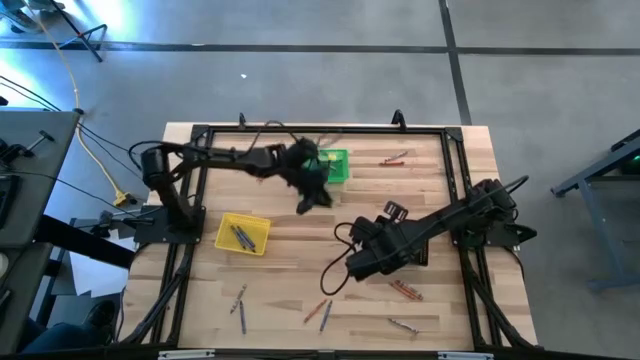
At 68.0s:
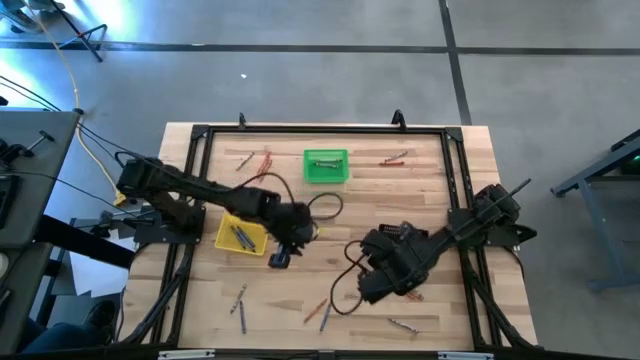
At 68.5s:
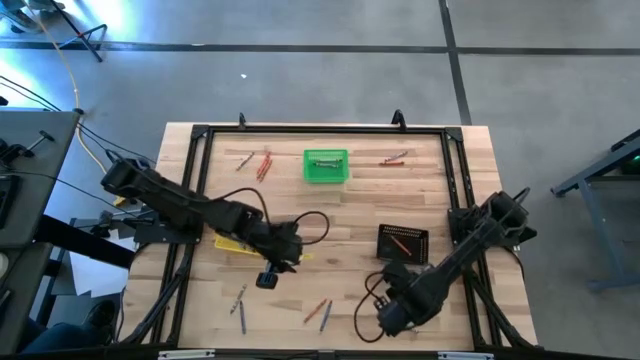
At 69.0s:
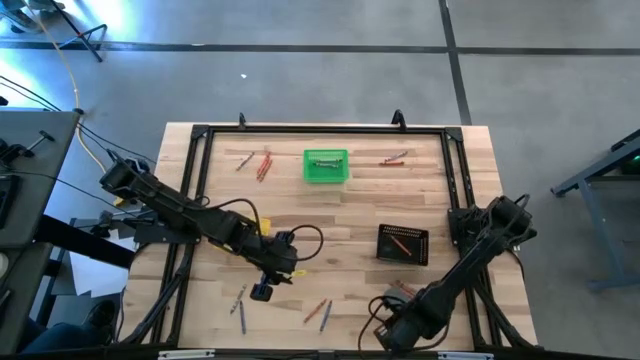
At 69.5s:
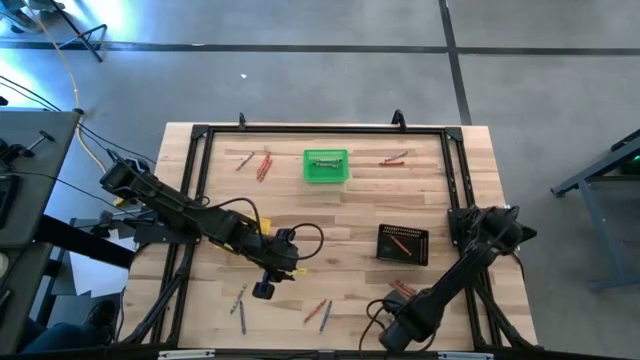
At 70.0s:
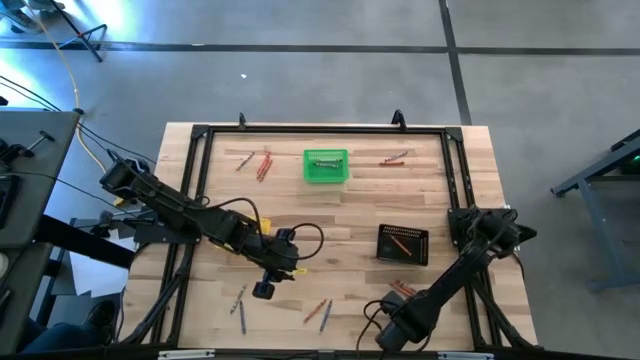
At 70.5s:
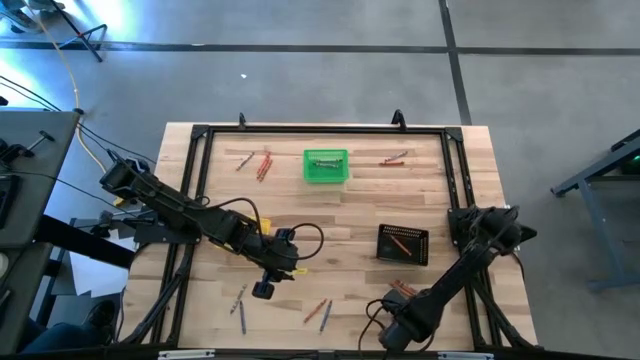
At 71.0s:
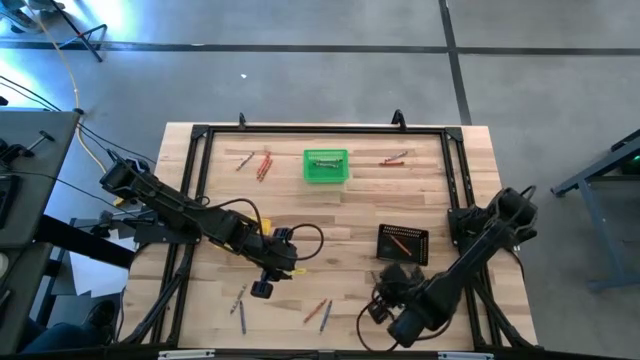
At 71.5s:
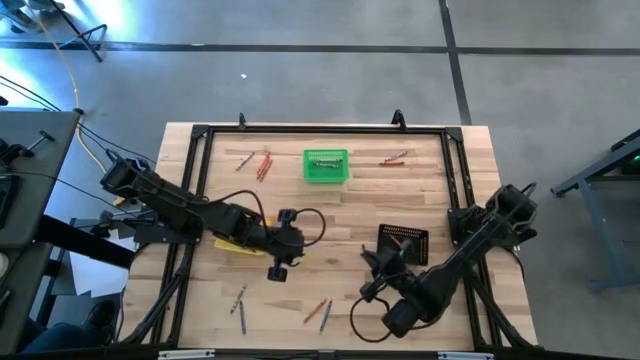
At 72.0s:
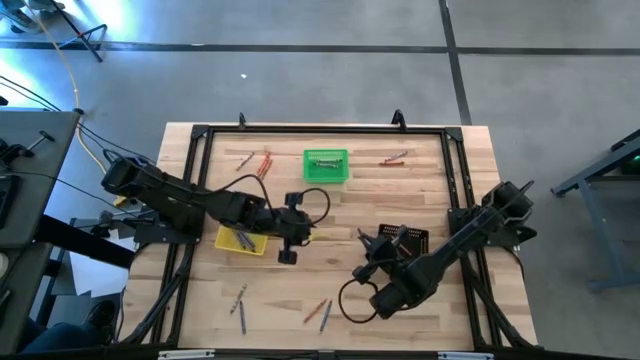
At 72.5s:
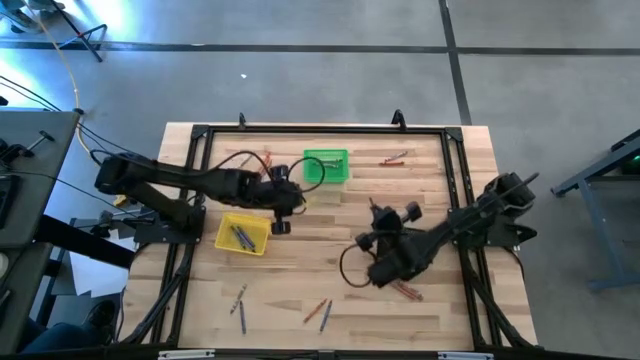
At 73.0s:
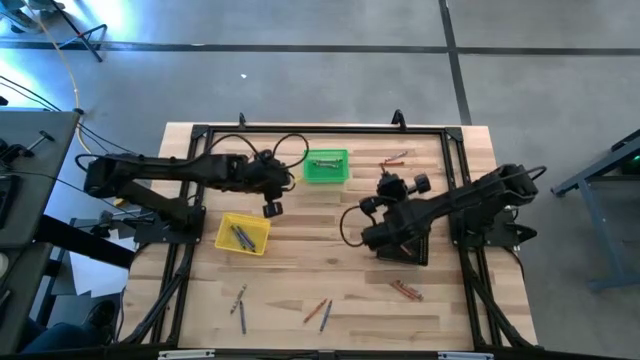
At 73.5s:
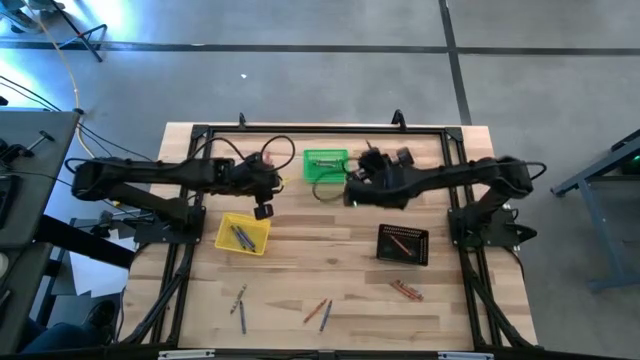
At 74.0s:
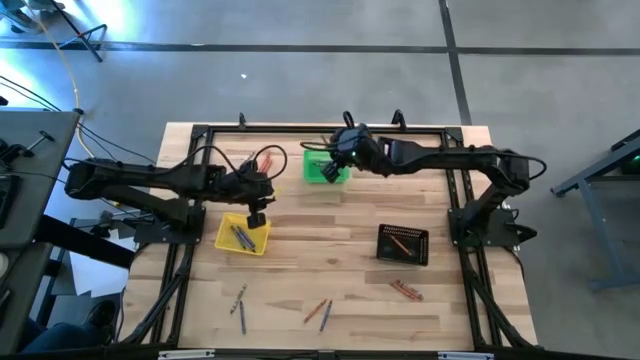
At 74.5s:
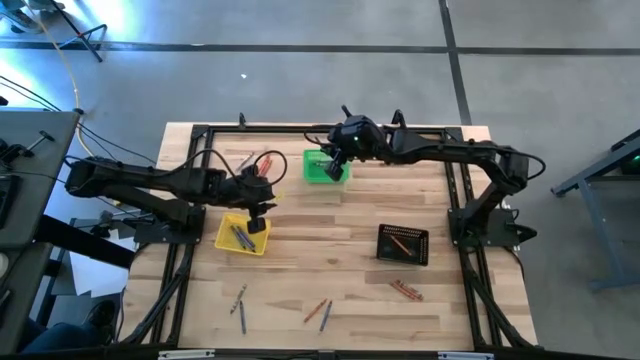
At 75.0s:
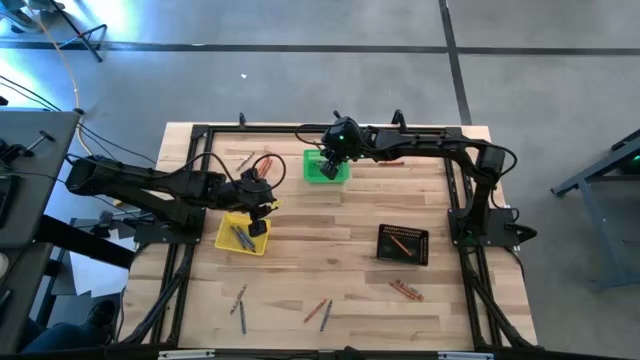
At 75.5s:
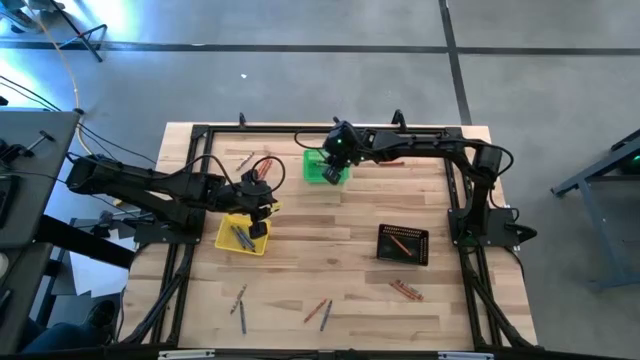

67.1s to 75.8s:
Task: Sort crayons
Put the gray crayon into the green basket

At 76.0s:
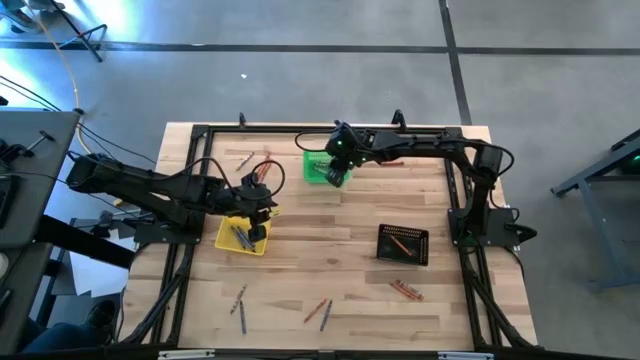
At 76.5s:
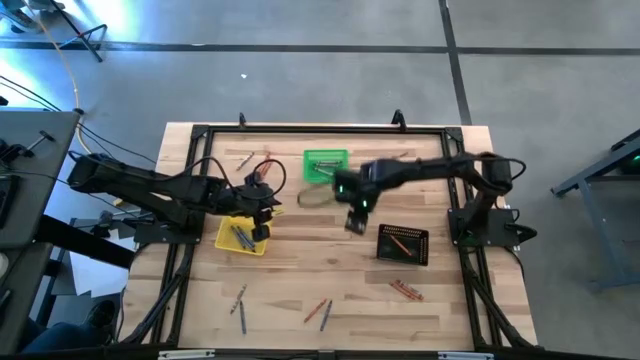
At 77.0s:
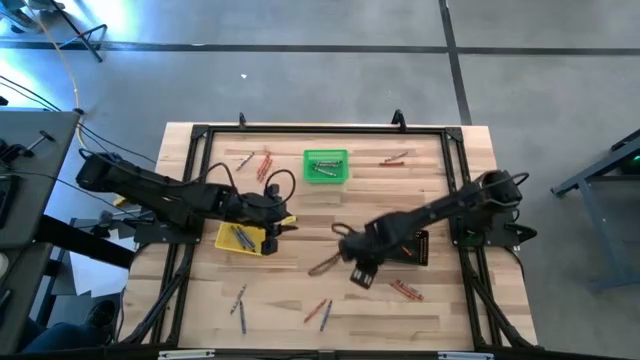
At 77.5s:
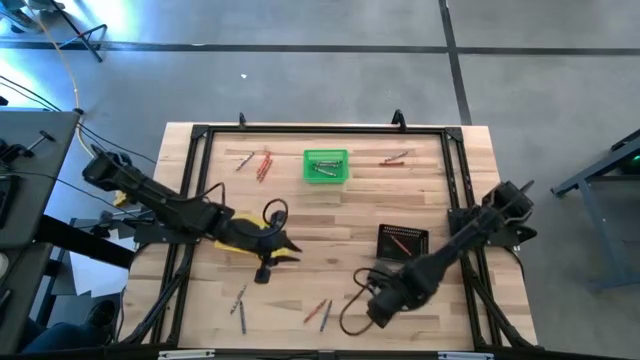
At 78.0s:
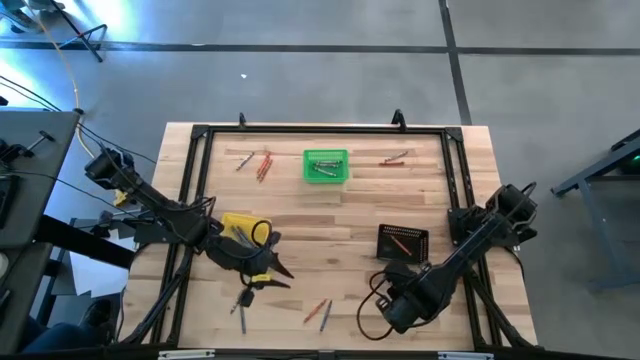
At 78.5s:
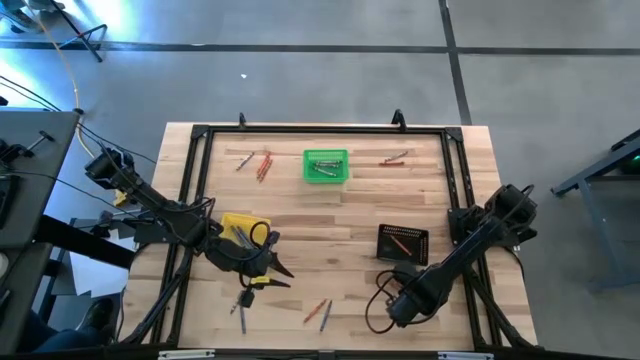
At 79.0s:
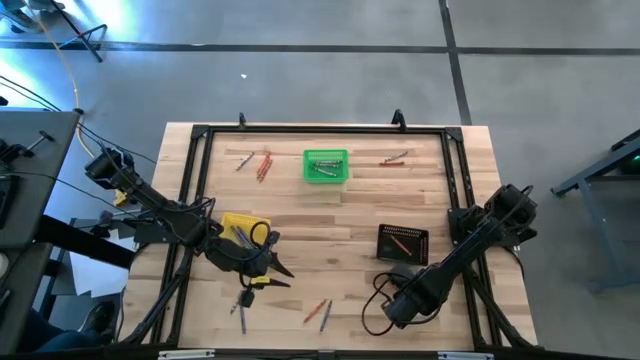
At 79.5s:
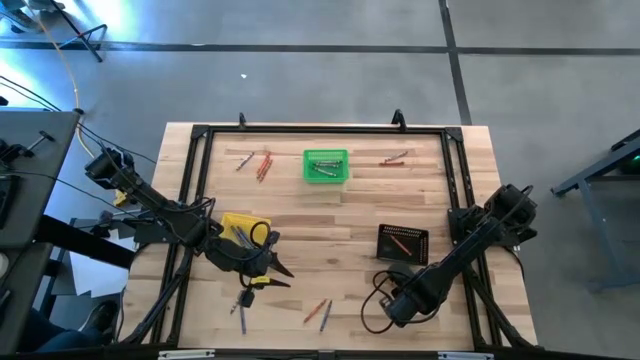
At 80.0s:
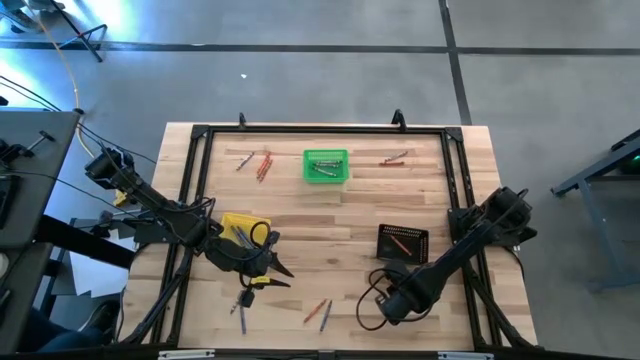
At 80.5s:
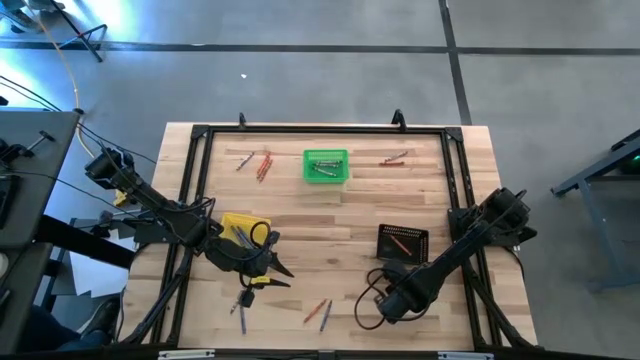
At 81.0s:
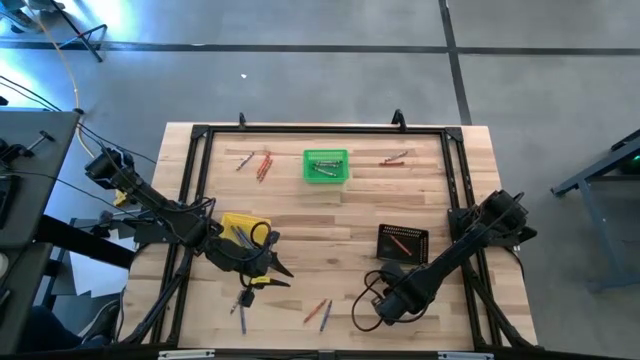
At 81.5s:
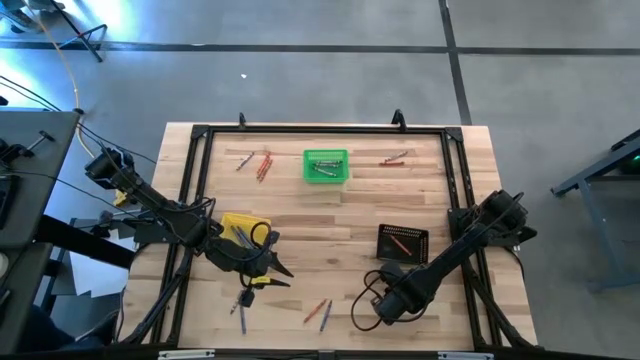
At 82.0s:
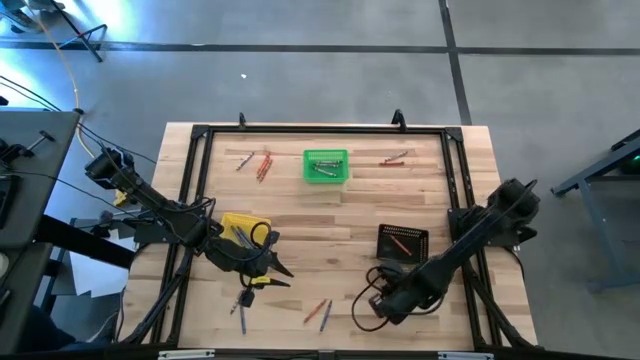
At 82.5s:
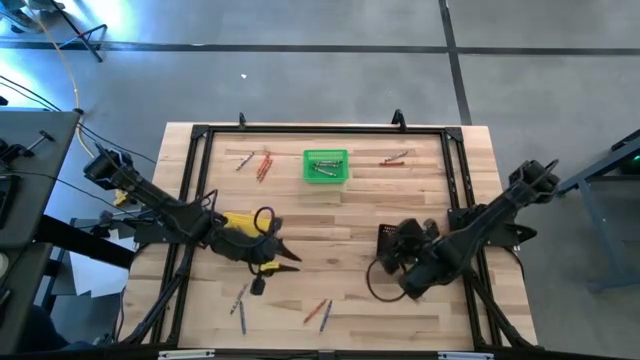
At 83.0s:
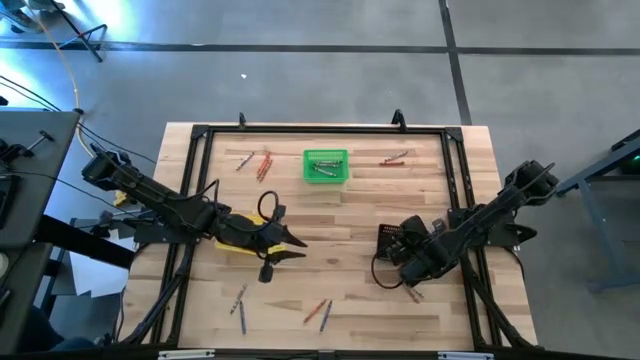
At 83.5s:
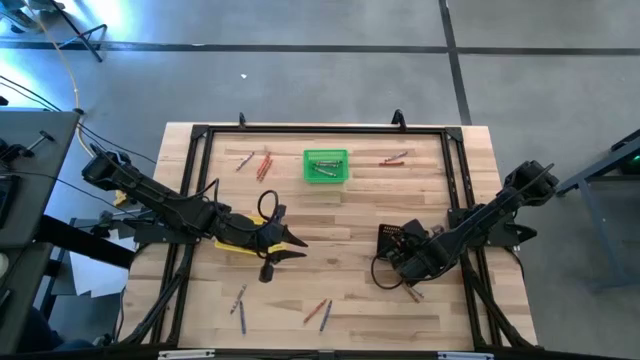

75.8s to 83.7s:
Put the orange crayon into the black basket

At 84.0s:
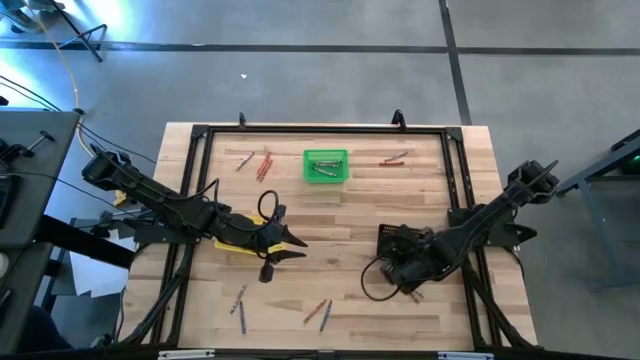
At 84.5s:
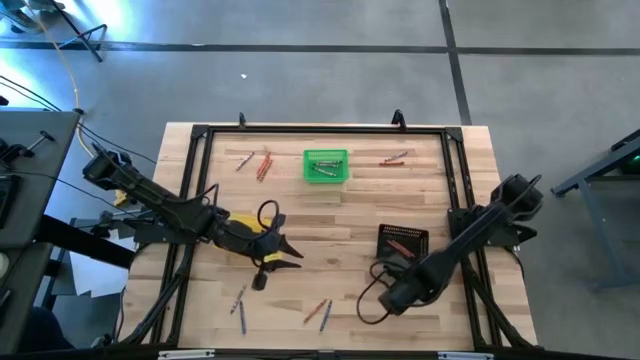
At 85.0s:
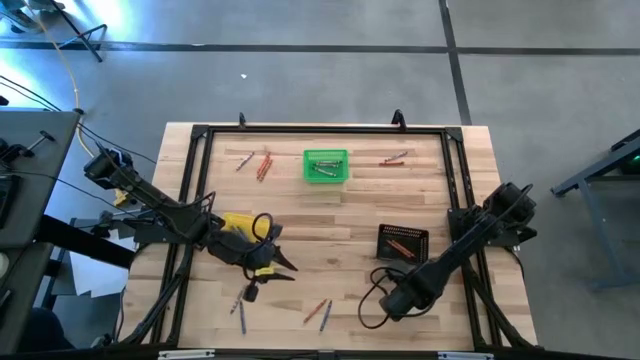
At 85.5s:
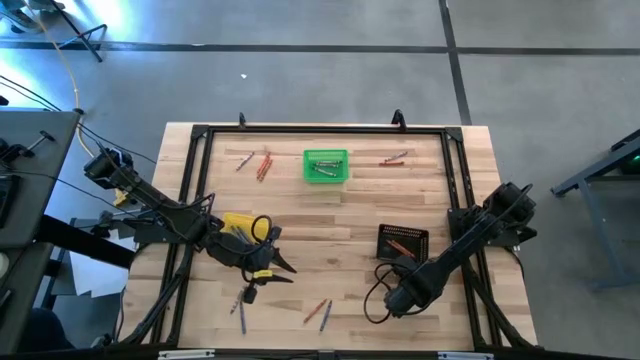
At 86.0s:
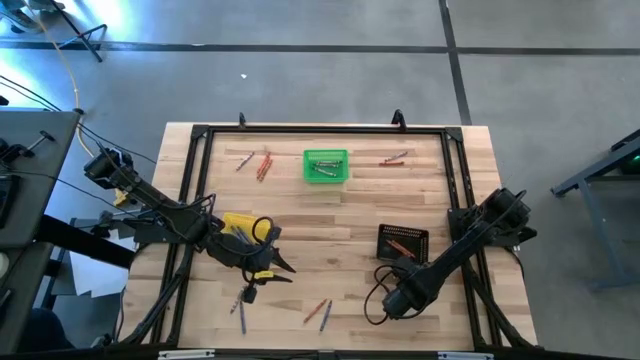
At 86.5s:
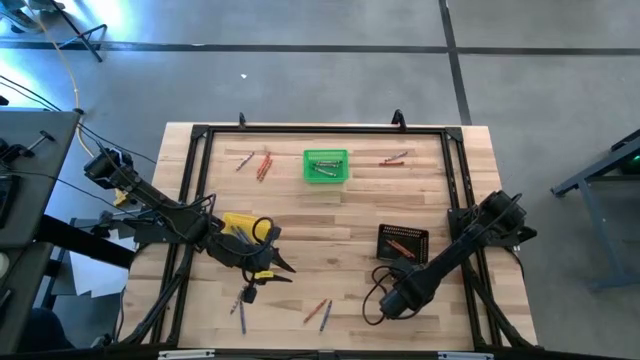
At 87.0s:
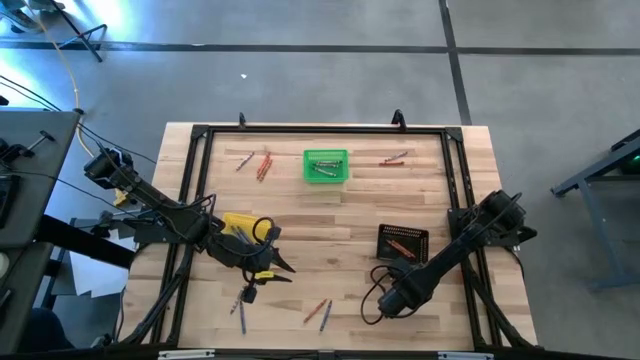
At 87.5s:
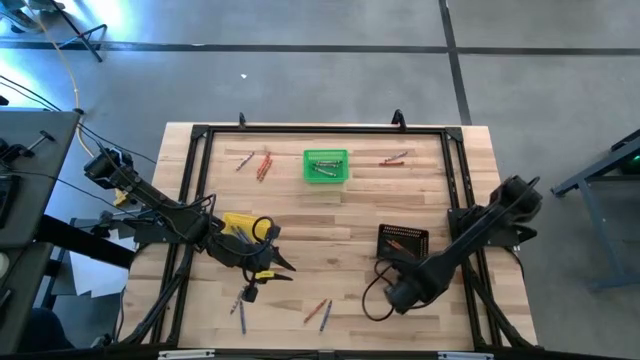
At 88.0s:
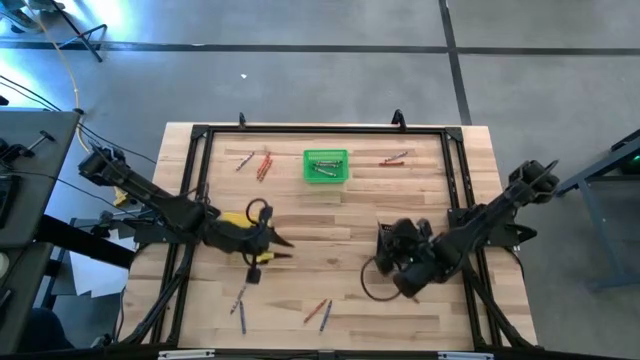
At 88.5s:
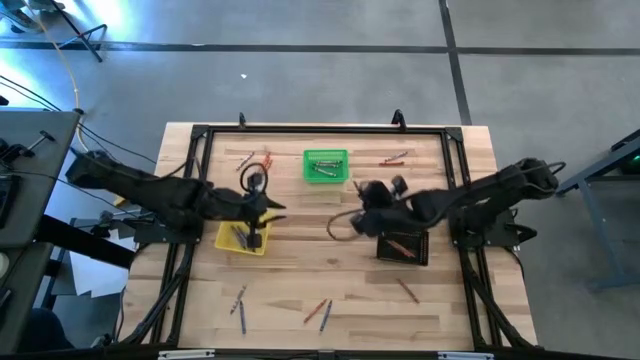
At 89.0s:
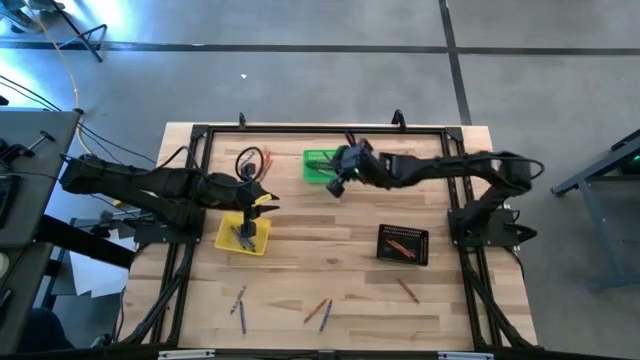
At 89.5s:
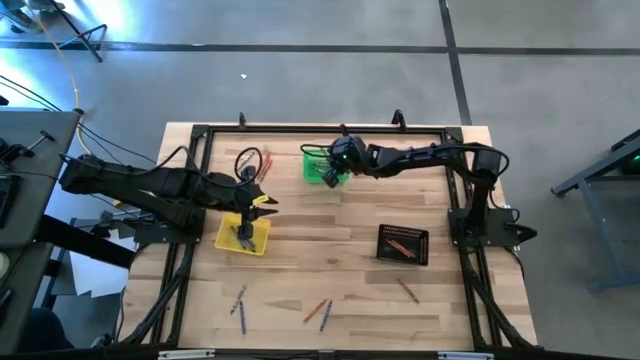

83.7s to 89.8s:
Put the gray crayon into the green basket

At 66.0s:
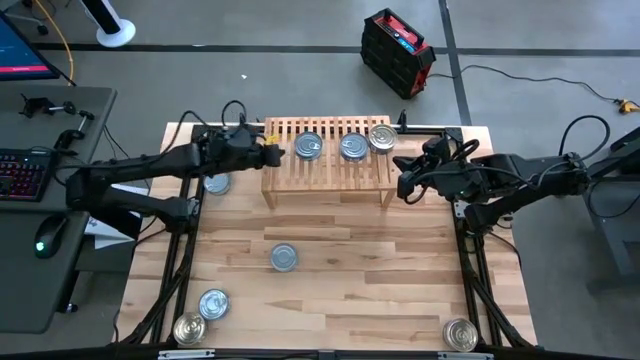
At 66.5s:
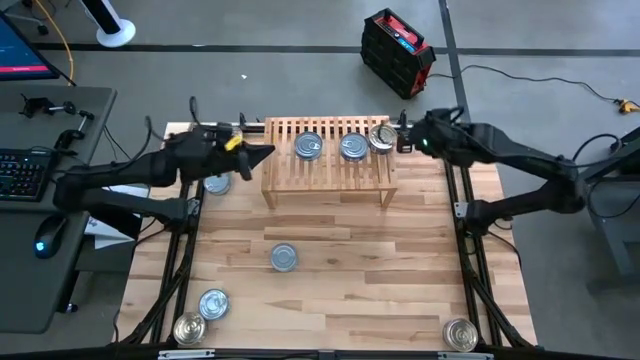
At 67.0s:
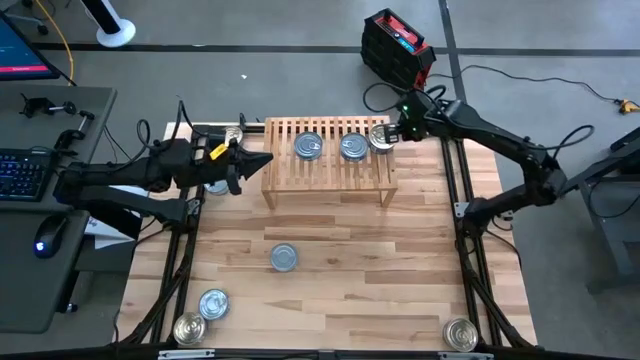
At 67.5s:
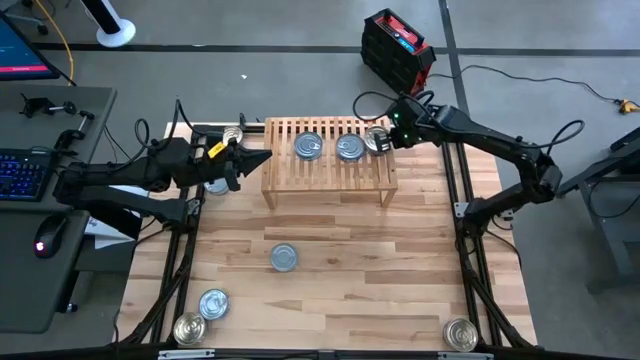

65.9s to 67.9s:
Task: Stack canned seafood by type on shelf
Adjust the pink tuna can on the shelf
